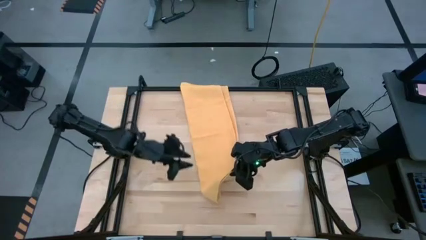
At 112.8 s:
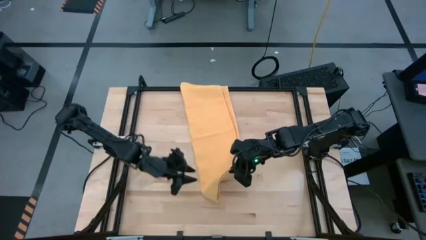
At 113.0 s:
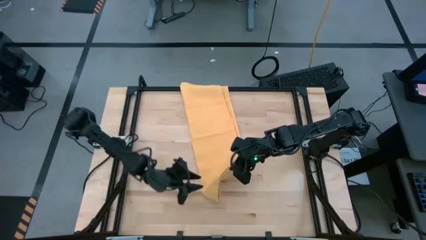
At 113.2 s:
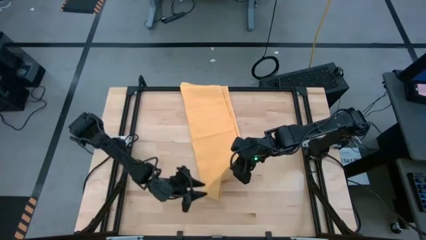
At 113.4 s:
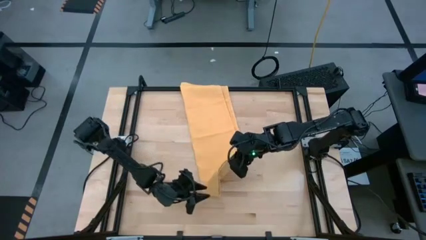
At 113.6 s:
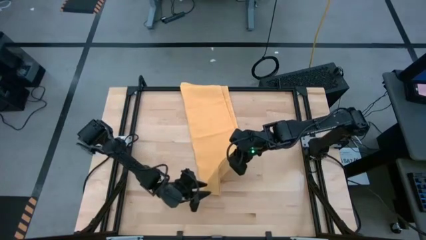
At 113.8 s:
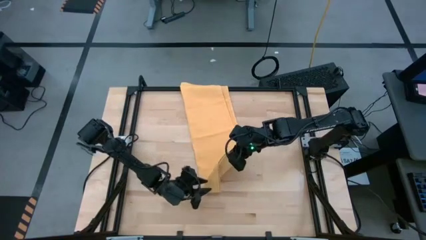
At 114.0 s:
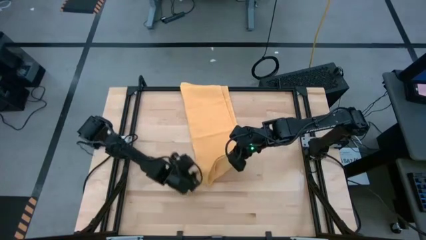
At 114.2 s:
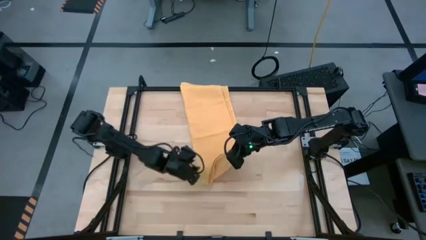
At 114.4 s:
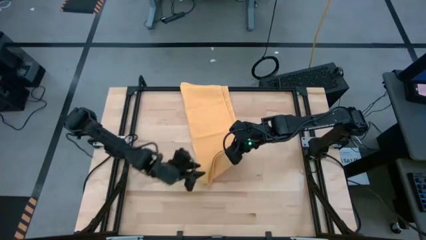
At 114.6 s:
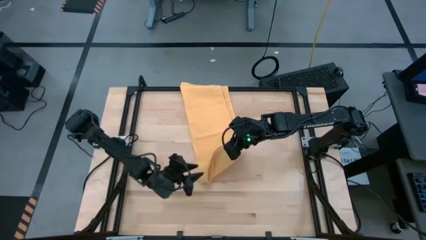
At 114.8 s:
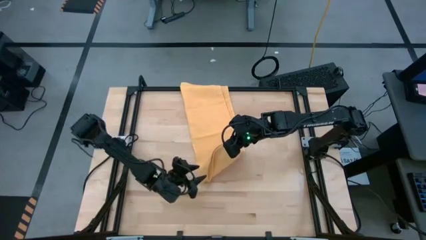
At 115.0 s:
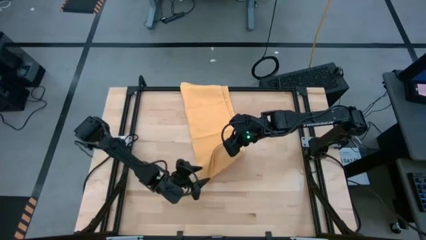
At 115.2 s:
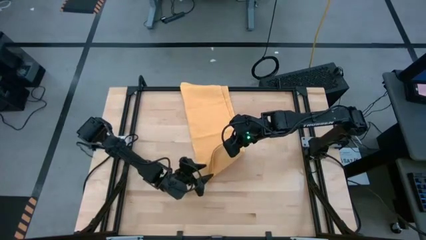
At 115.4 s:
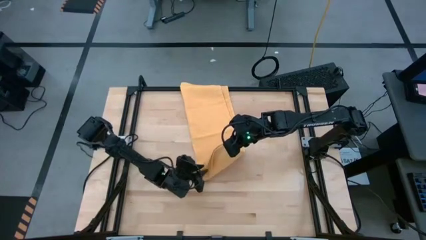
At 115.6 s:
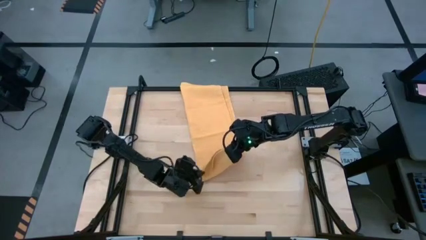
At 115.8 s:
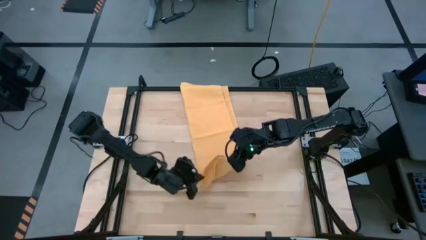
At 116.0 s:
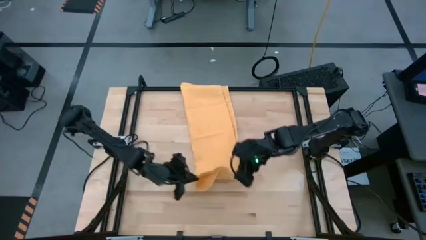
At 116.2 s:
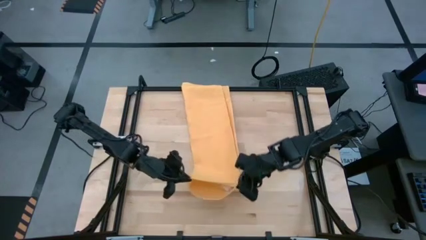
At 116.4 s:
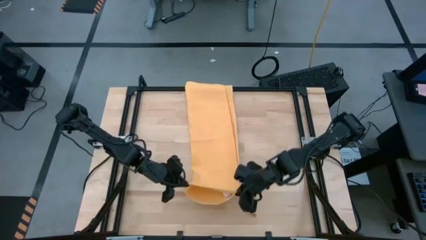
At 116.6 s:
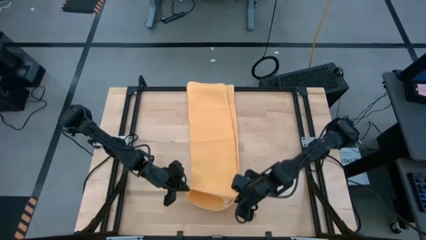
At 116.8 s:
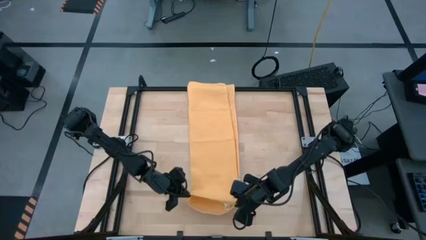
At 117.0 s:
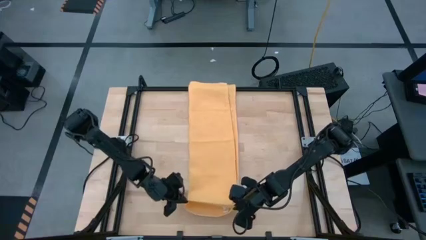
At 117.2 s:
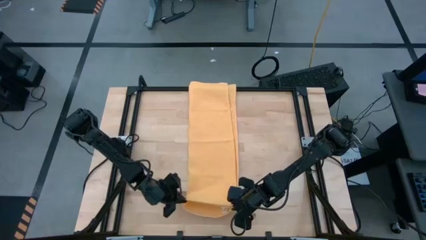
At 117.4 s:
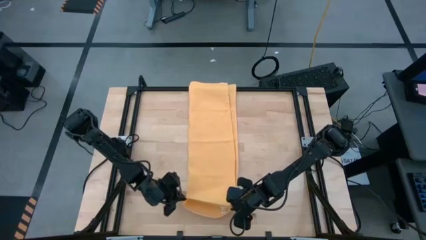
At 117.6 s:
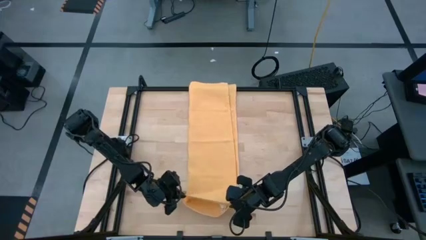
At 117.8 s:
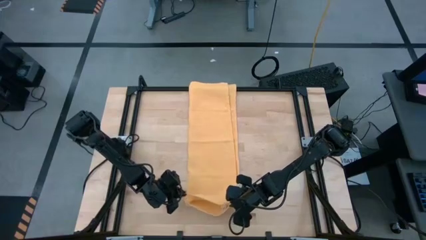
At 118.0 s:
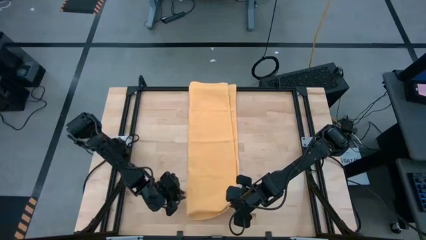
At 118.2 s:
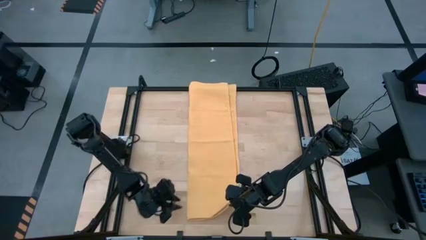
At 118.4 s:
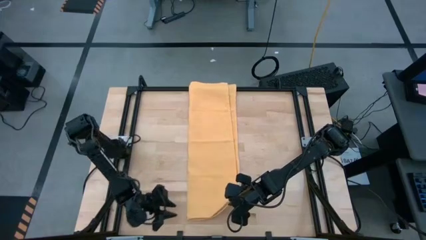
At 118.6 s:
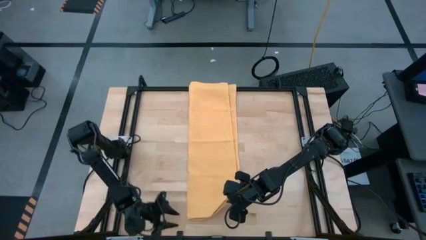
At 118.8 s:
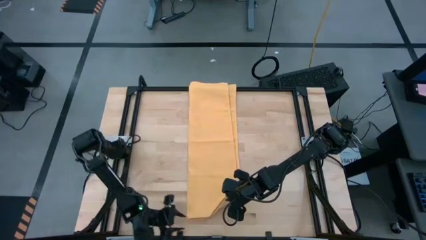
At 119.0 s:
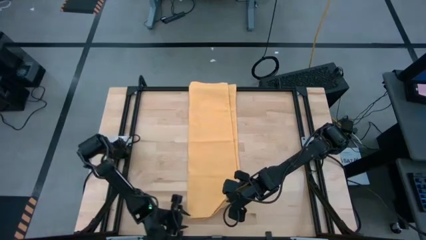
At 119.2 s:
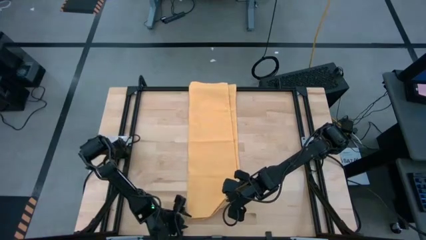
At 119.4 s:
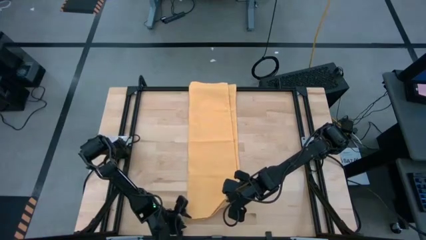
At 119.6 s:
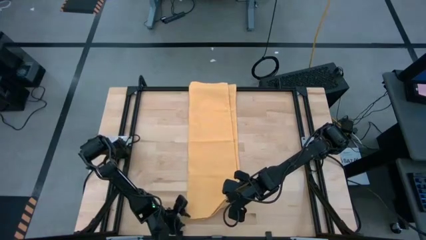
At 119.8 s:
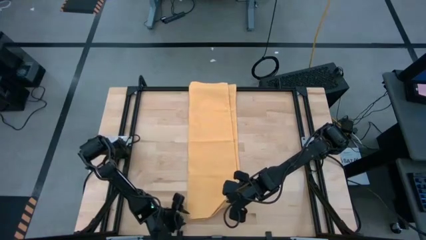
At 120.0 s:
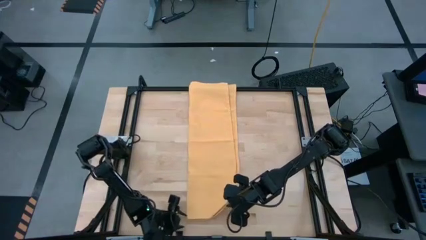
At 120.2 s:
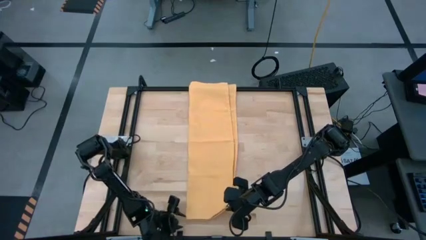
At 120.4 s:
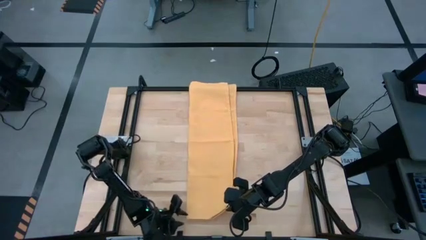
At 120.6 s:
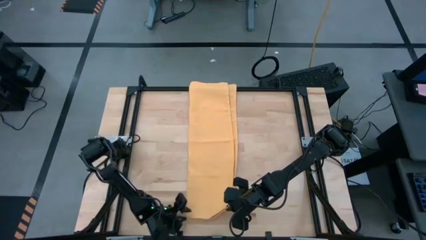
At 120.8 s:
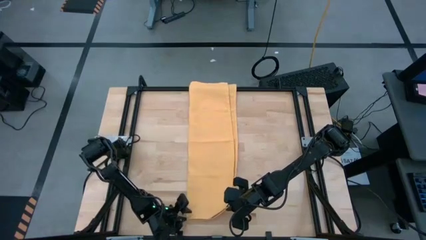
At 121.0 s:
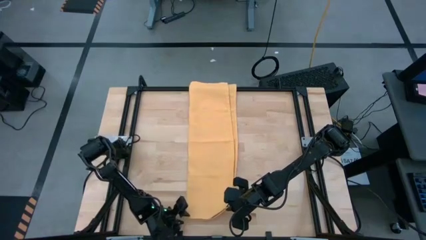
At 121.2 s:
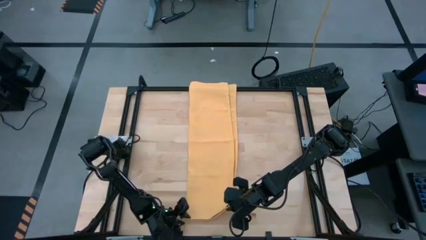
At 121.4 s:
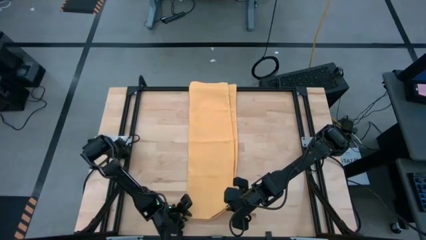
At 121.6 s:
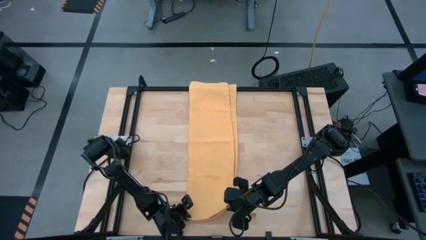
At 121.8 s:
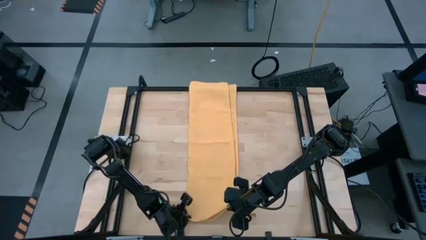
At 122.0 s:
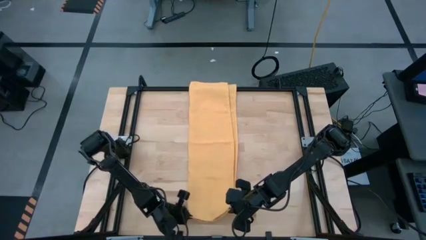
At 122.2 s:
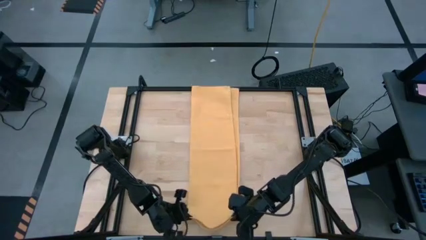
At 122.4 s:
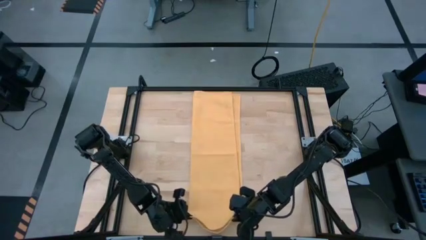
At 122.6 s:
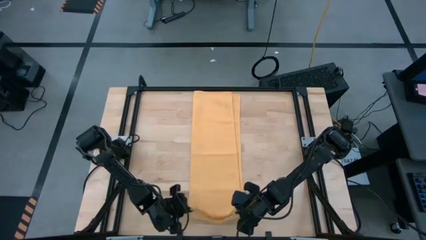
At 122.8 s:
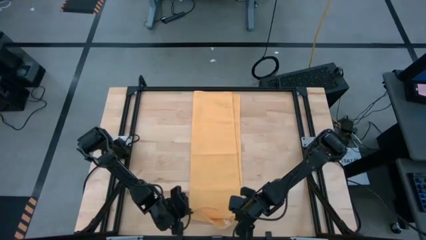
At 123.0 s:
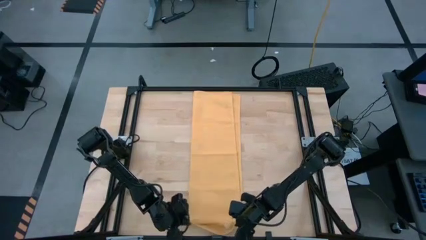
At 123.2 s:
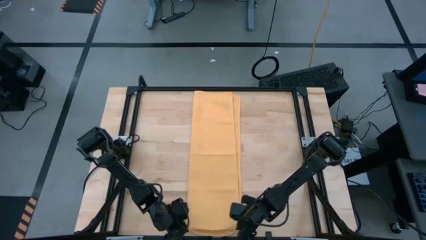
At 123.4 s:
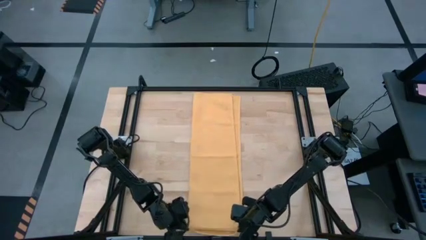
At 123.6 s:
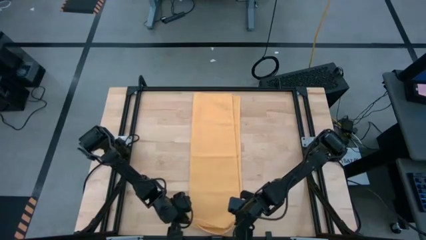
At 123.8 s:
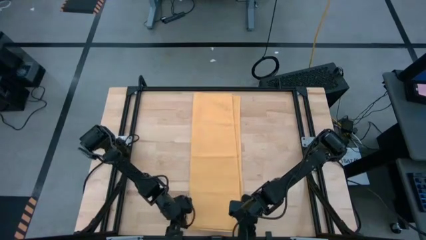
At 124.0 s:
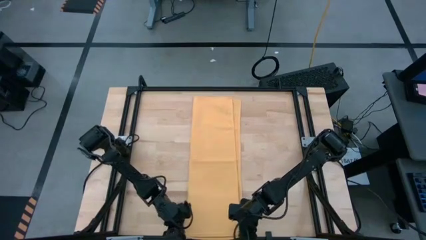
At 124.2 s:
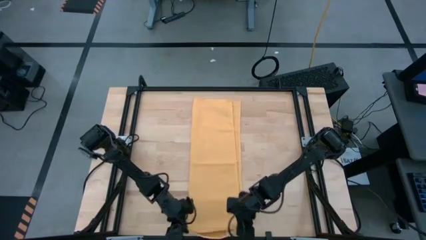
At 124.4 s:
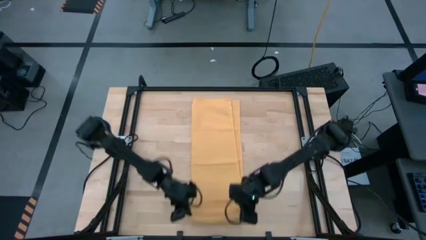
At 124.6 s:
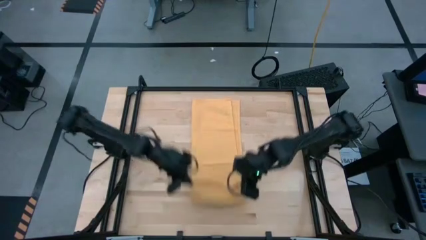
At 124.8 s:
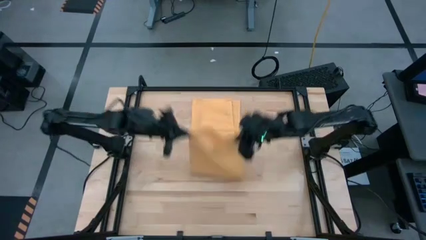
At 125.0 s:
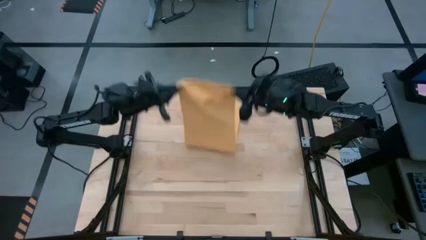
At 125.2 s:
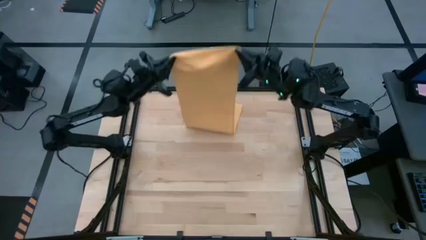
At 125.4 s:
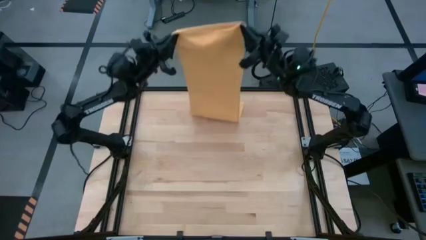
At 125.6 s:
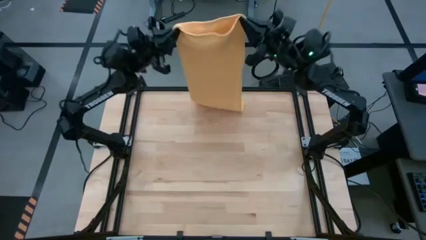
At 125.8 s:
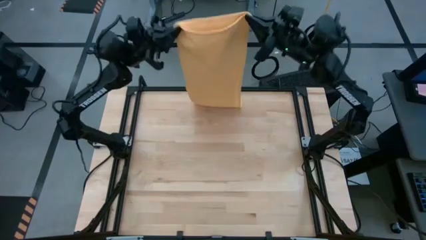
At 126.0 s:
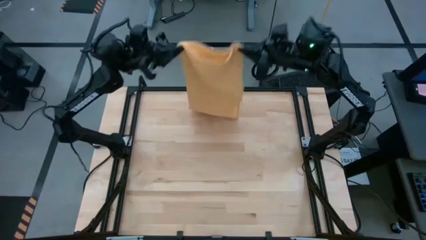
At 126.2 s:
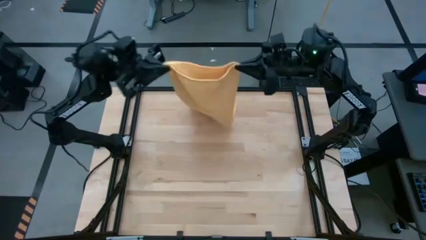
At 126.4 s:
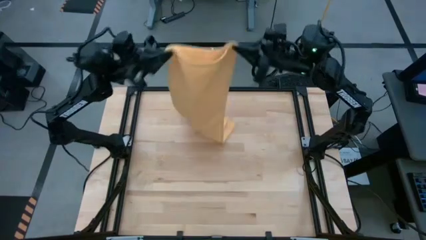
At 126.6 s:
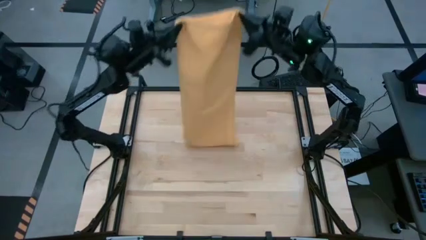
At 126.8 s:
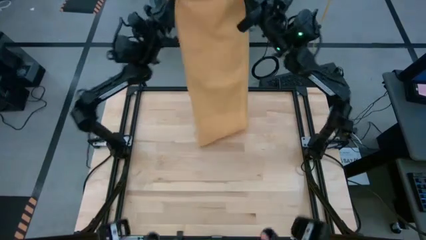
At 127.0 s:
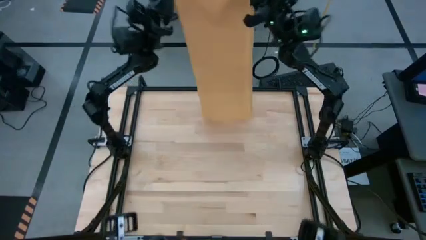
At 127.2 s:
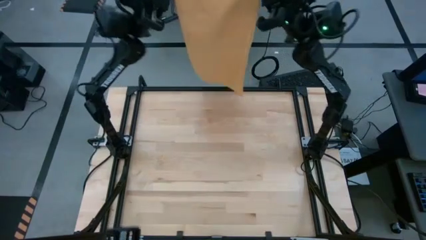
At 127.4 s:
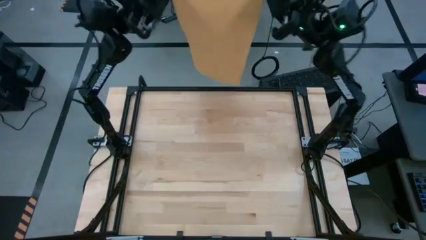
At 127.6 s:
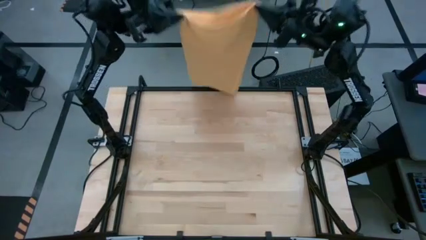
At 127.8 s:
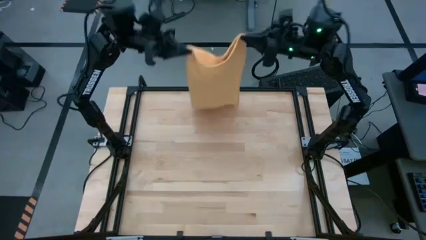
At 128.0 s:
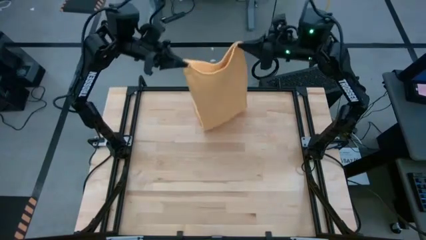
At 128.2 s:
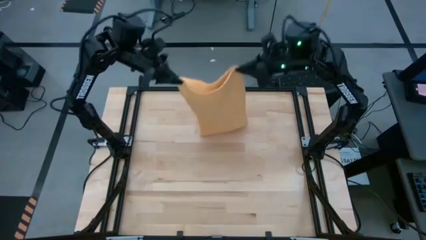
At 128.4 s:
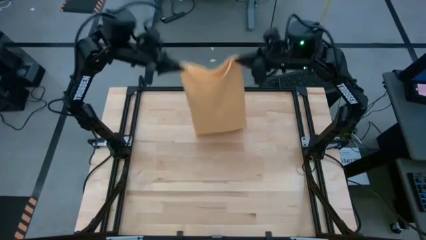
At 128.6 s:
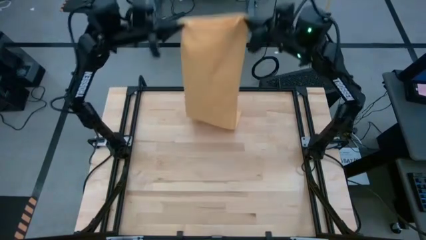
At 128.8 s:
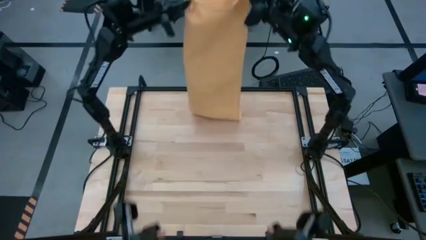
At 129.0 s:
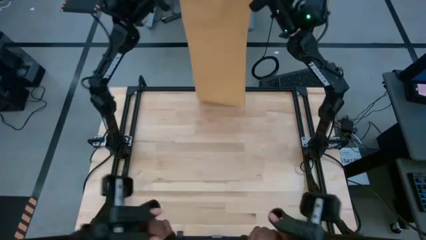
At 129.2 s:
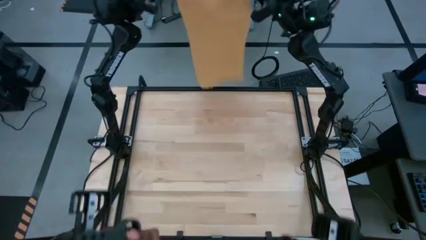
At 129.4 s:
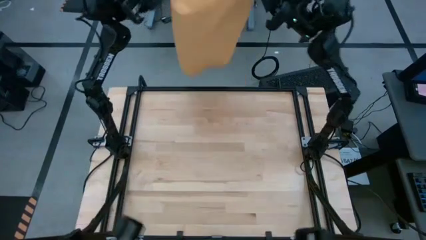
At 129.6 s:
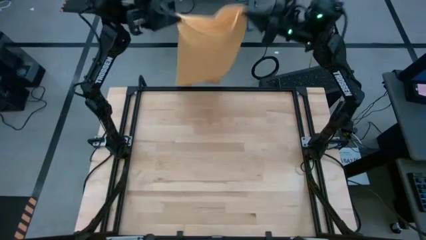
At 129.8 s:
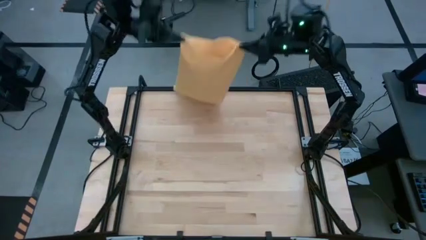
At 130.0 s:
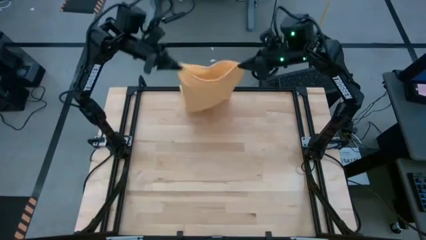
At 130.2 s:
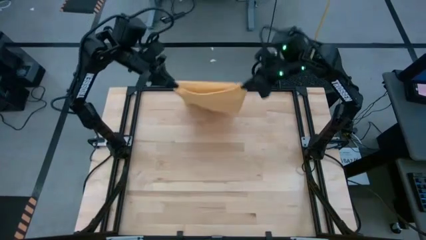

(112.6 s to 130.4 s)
Task: Roll towel
Roll the yellow towel
